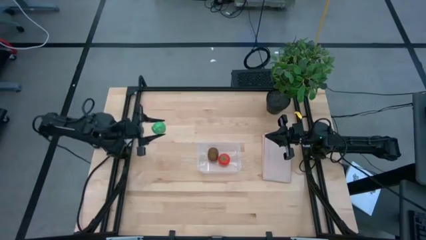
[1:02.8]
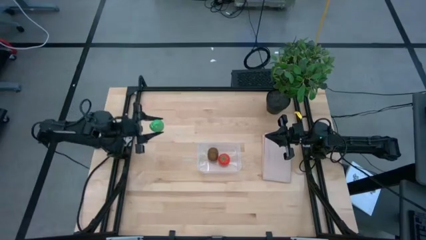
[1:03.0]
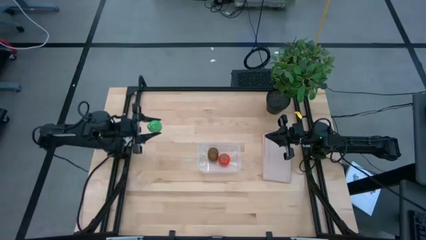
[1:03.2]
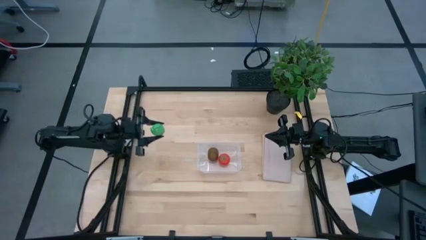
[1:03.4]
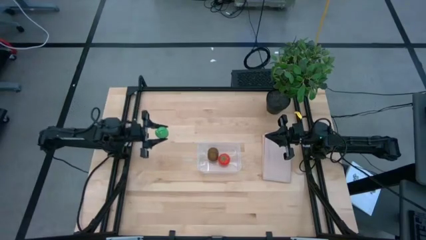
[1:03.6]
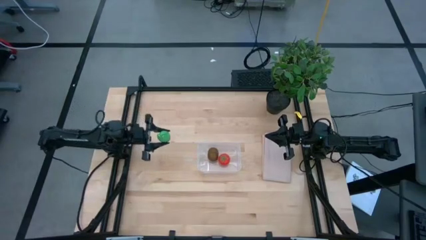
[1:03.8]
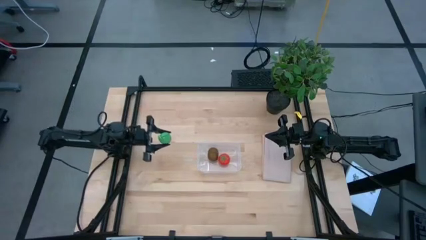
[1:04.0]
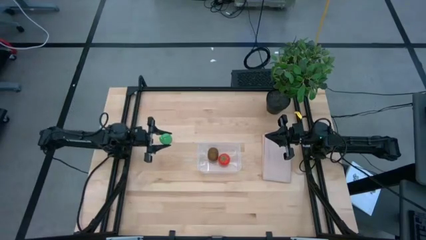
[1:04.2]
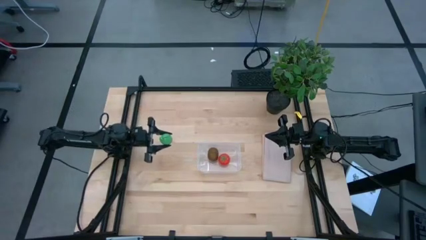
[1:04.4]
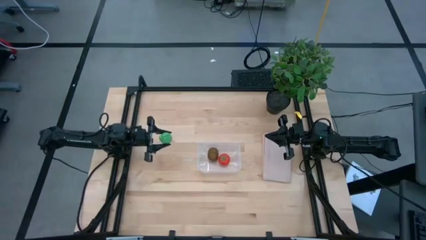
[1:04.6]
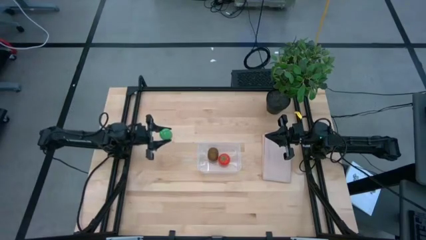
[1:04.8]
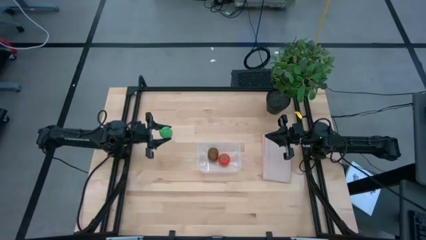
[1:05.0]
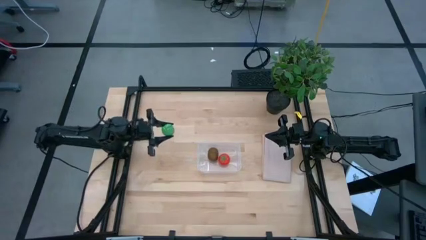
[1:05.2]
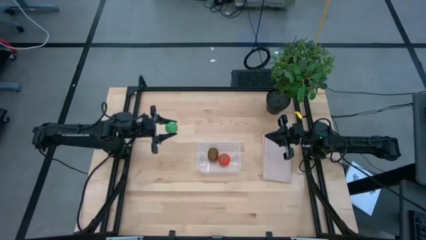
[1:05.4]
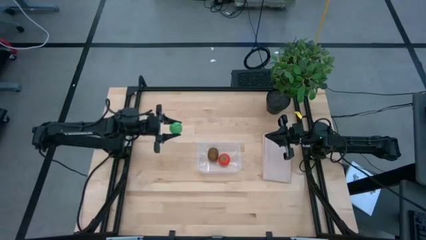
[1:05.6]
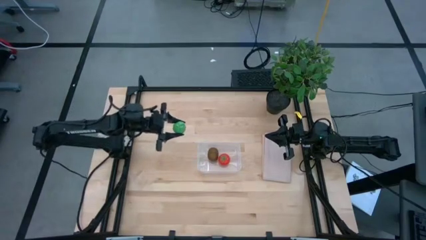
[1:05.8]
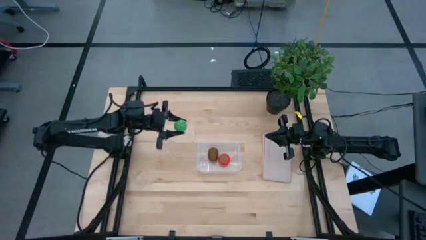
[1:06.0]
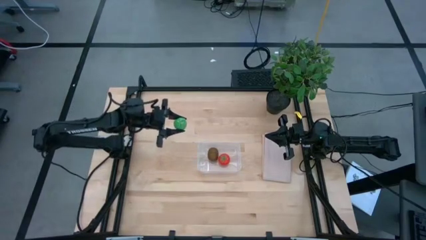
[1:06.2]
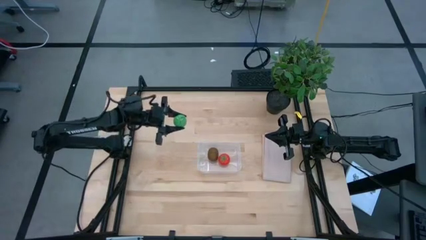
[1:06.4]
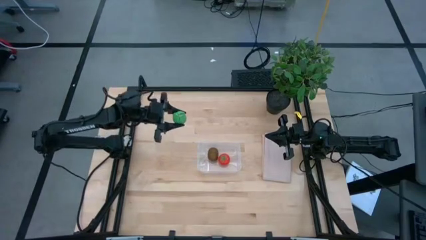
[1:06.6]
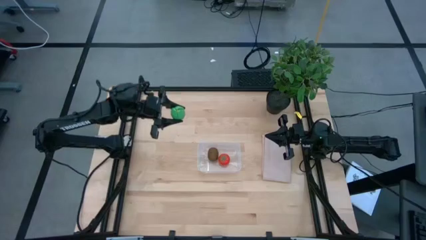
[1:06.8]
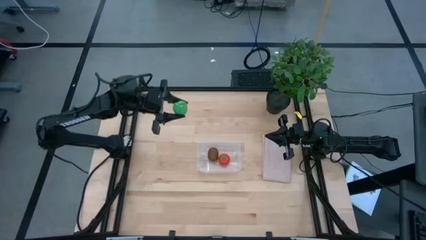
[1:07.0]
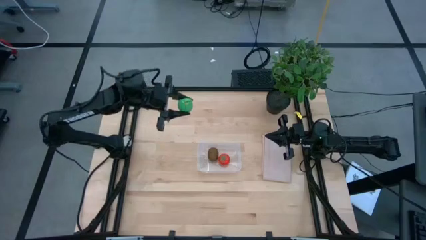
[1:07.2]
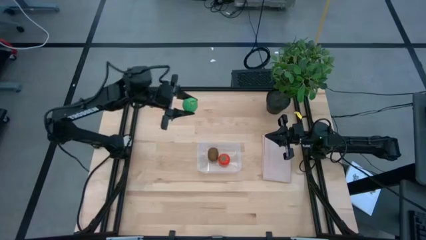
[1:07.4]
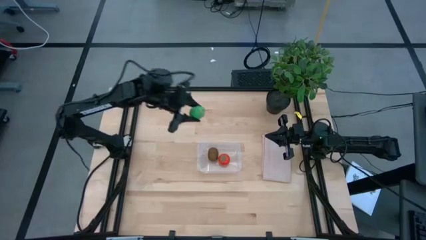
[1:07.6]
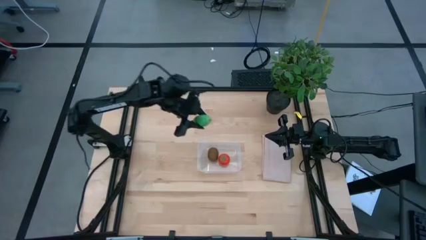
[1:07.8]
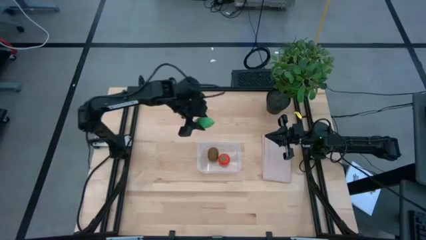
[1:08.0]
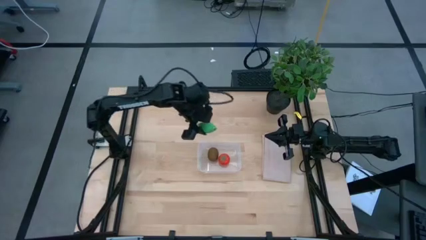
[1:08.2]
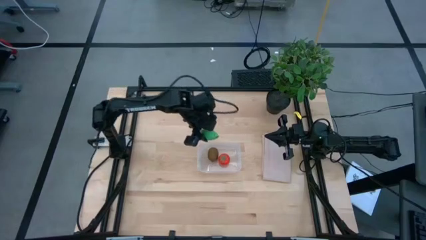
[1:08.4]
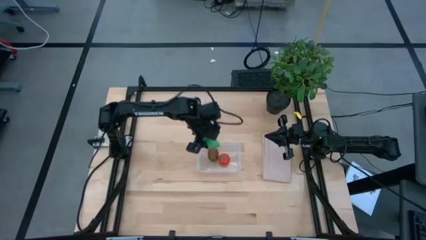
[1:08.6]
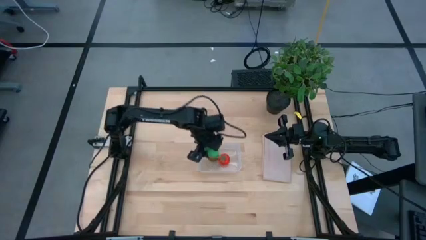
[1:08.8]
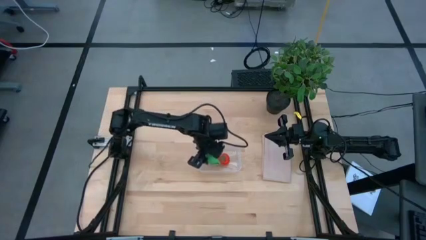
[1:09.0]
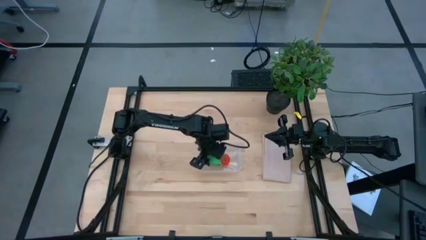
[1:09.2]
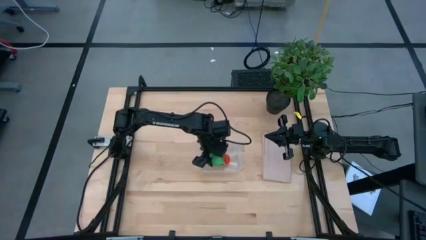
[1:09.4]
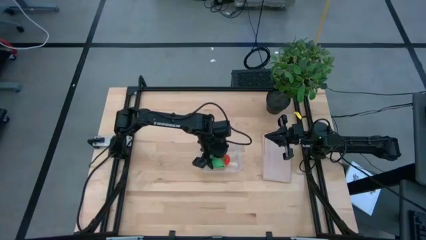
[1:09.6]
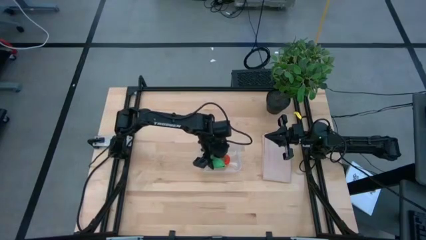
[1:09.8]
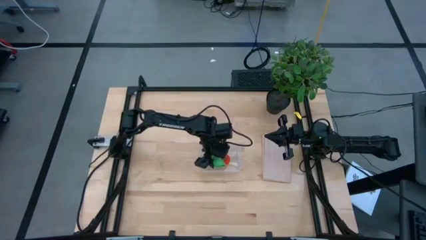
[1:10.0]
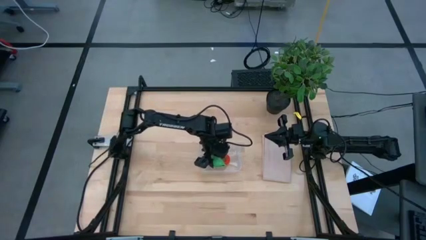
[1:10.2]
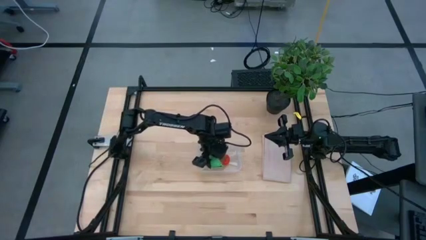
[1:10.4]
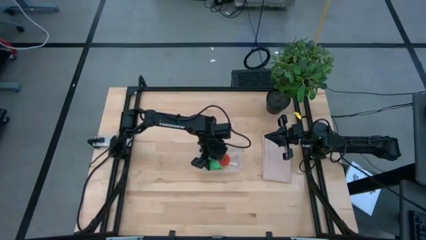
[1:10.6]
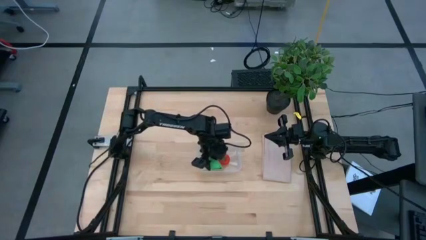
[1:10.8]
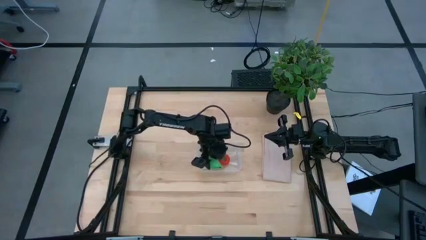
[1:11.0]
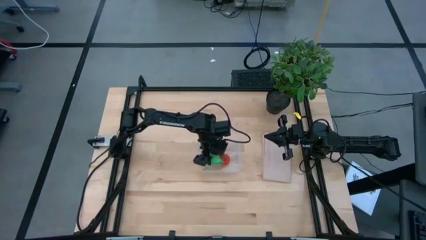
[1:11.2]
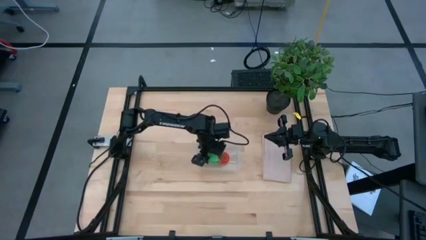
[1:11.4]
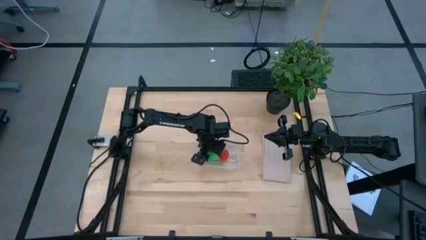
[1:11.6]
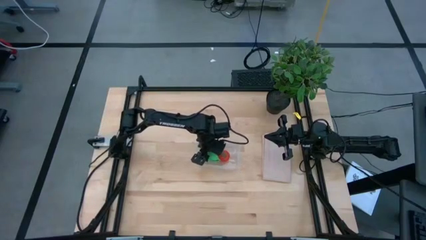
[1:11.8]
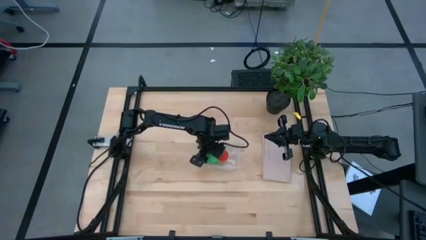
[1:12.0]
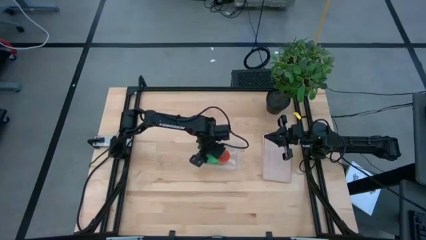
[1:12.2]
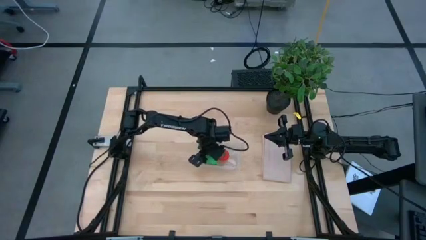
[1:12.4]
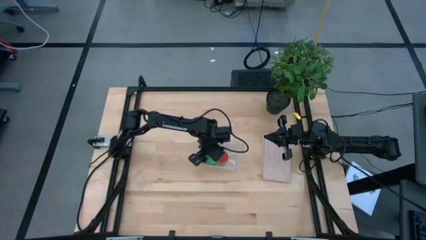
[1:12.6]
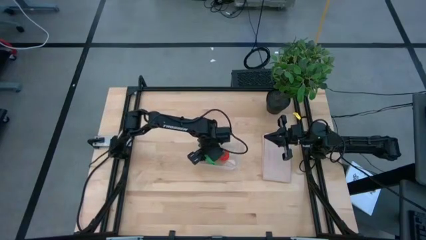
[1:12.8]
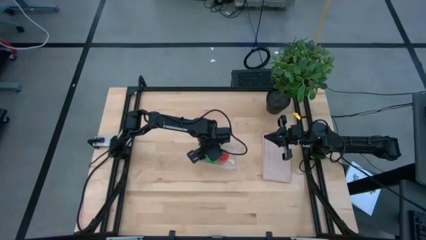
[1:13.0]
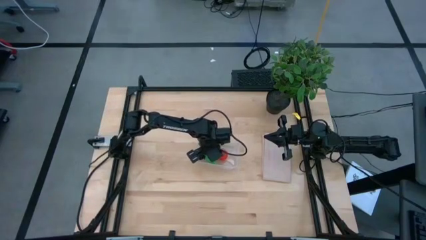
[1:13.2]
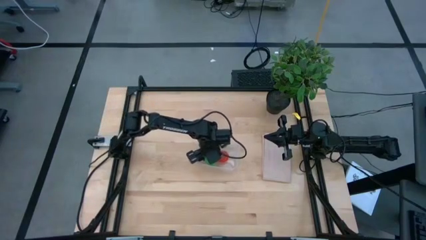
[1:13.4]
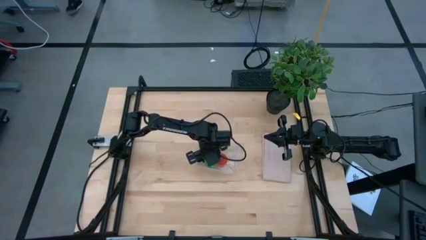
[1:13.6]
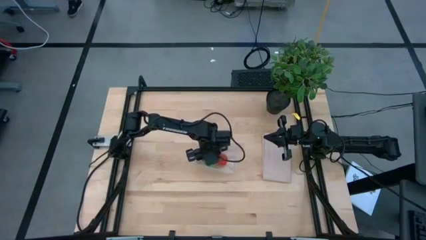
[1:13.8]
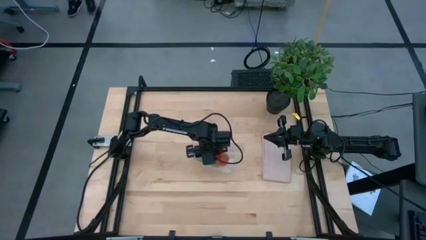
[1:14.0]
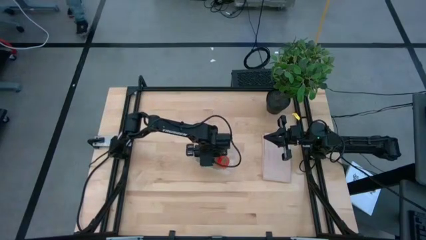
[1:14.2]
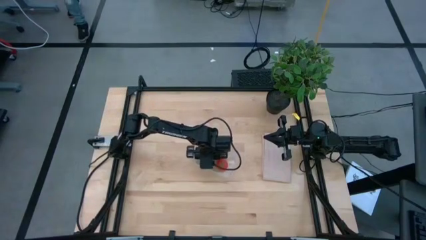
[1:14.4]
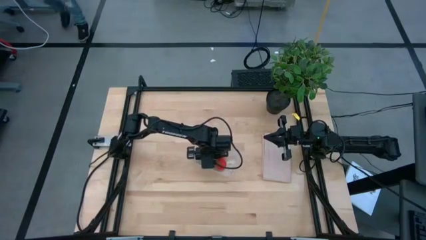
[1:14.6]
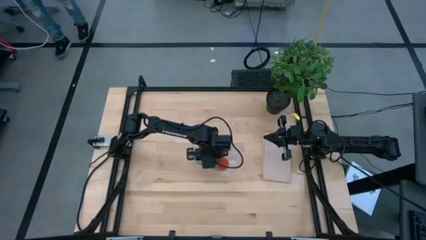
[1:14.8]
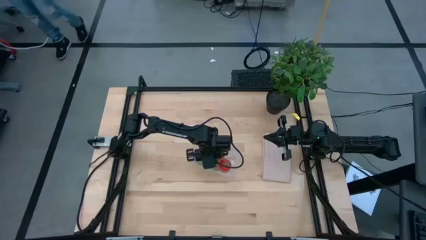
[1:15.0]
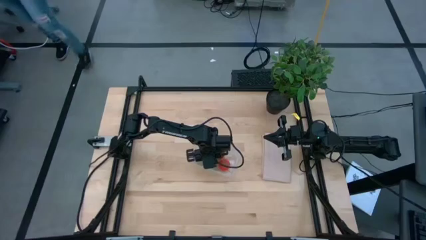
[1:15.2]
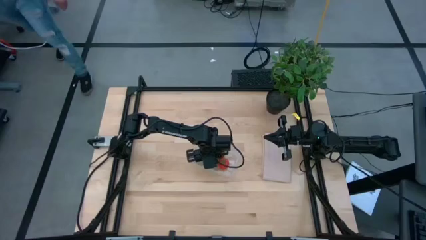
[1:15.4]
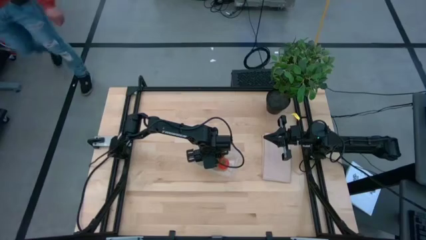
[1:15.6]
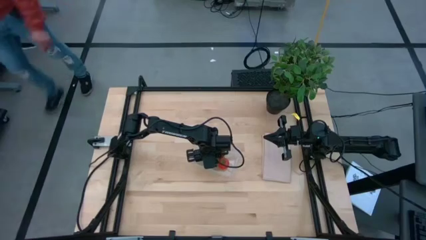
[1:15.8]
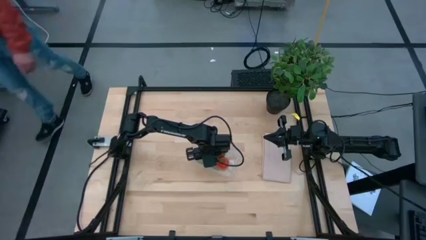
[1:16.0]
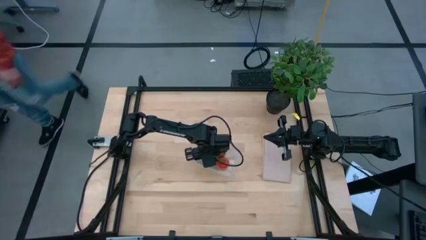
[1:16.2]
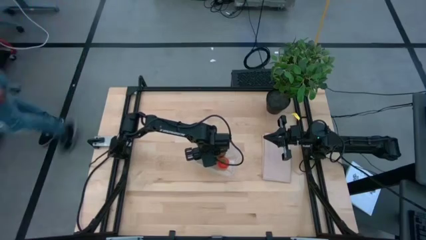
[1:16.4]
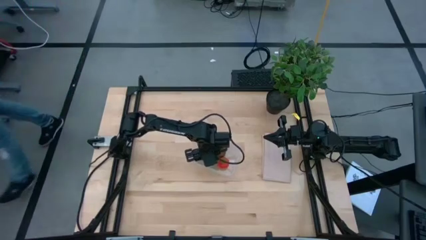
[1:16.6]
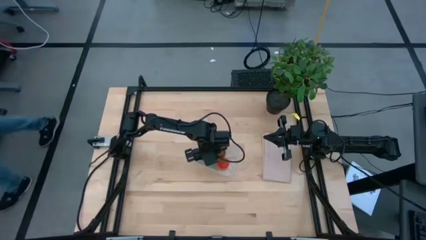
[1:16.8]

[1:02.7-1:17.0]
Task: Pick and placing Produce into tupperware
Put the corn into the transparent bin

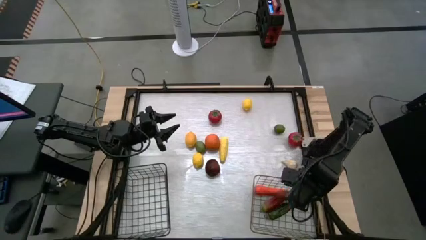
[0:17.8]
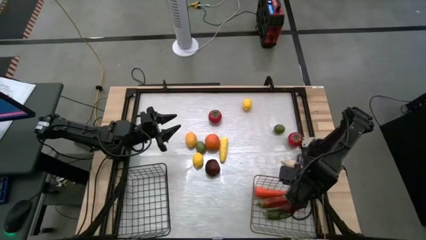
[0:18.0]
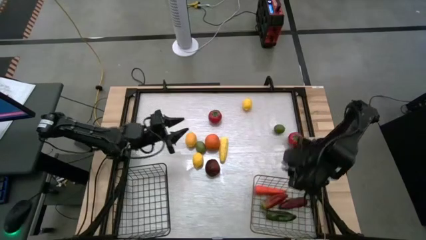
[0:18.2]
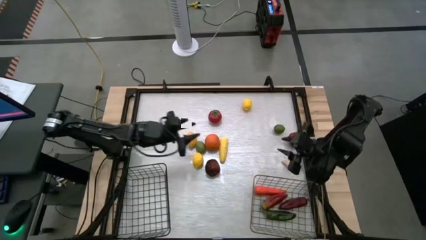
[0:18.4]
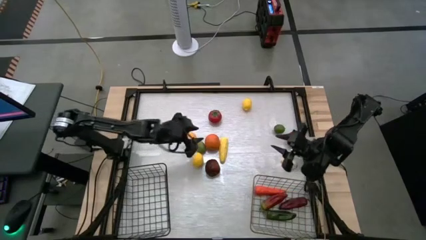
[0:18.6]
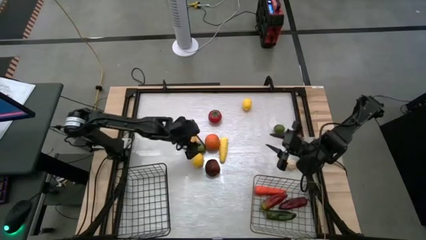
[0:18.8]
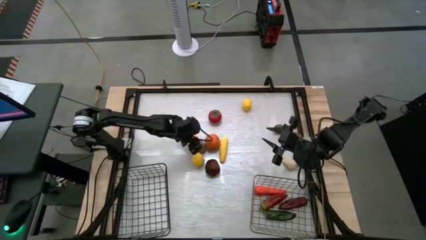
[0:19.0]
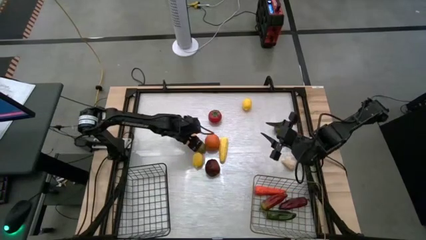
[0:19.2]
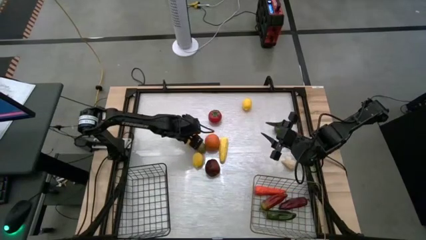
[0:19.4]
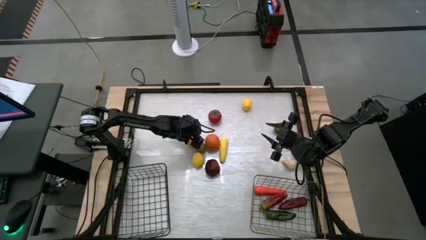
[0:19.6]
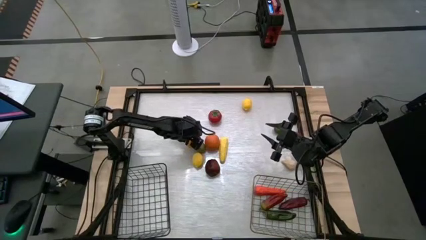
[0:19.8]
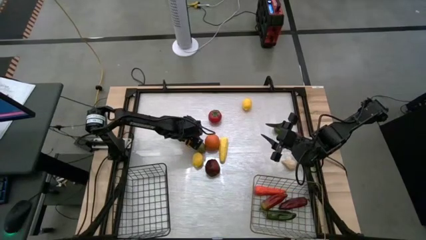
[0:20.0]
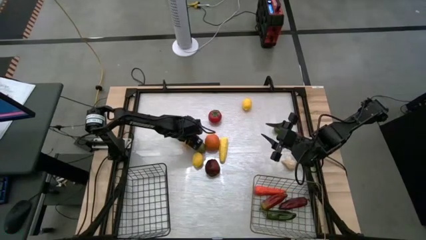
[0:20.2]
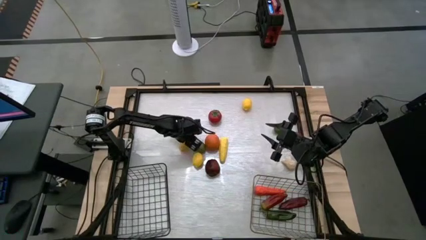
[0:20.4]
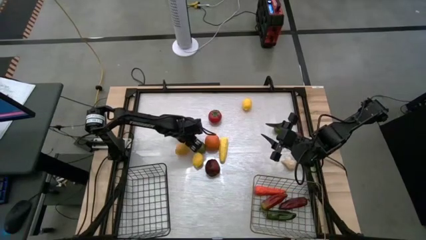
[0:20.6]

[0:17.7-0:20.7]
Task: Sort produce into baskets
Put the top left lemon into the black wire basket
